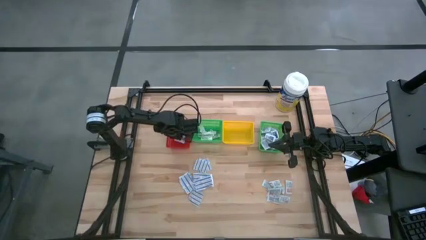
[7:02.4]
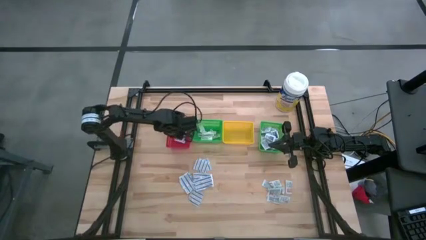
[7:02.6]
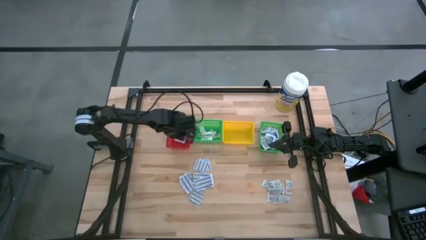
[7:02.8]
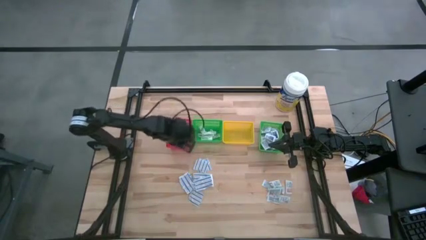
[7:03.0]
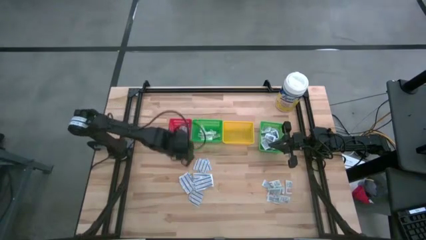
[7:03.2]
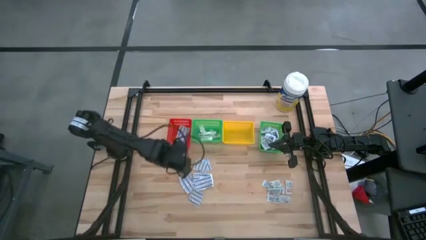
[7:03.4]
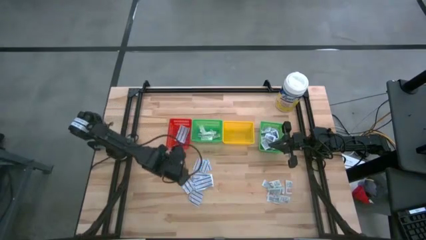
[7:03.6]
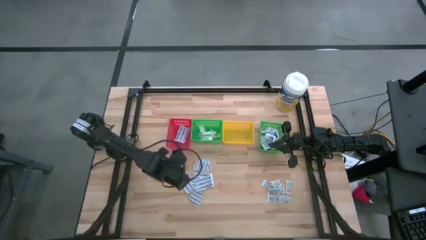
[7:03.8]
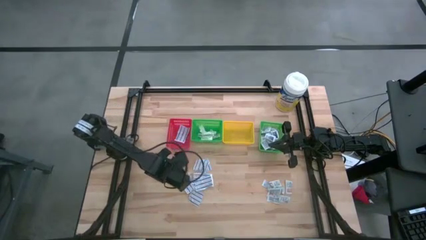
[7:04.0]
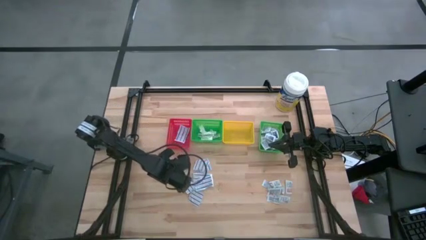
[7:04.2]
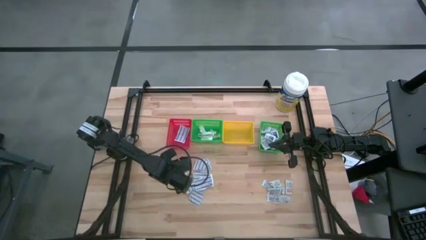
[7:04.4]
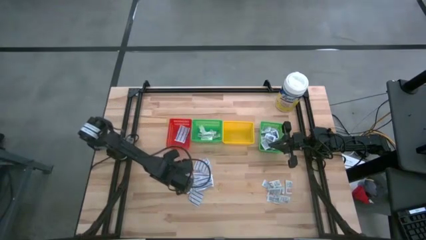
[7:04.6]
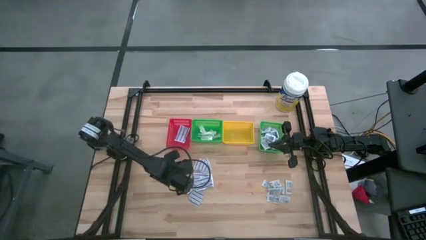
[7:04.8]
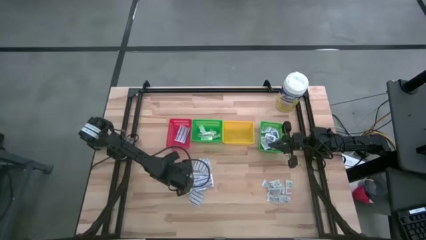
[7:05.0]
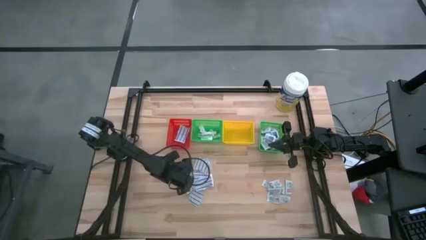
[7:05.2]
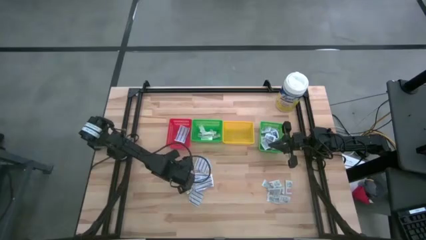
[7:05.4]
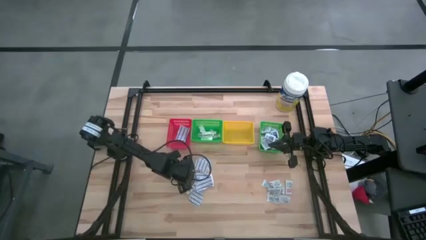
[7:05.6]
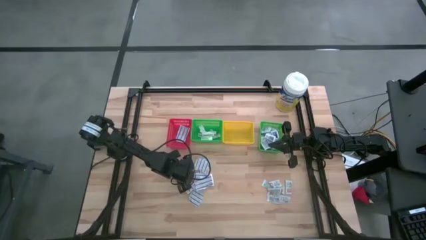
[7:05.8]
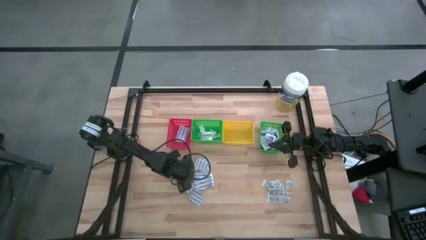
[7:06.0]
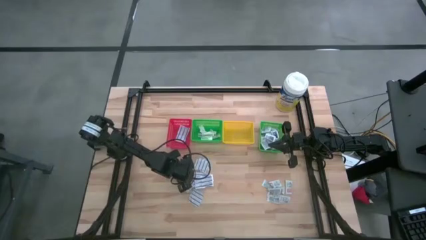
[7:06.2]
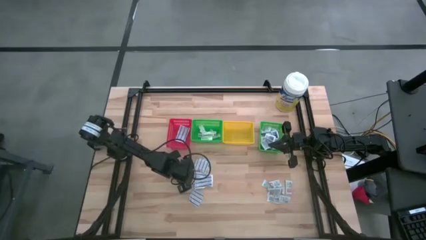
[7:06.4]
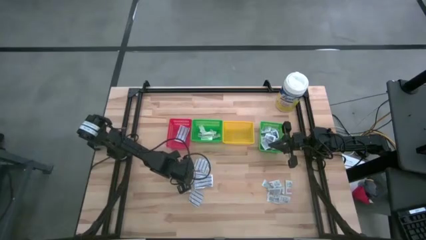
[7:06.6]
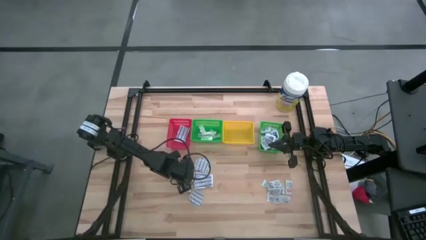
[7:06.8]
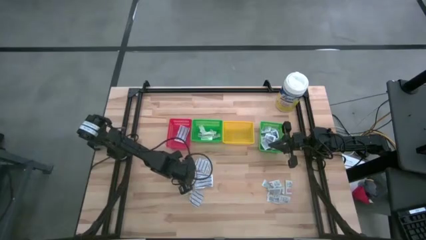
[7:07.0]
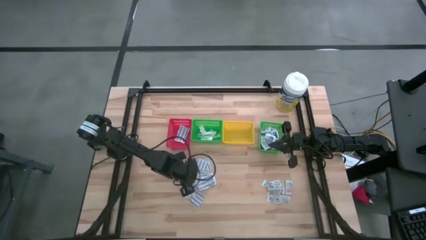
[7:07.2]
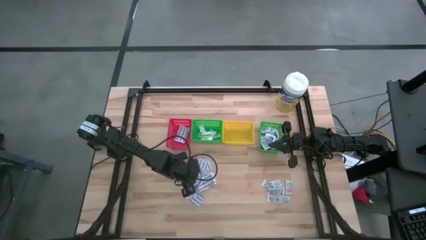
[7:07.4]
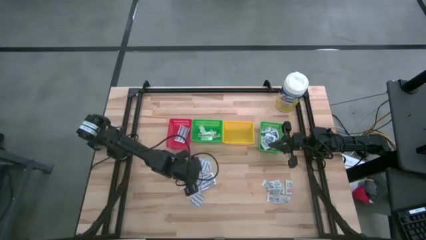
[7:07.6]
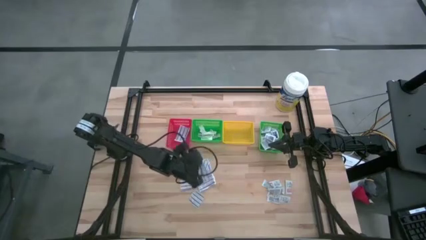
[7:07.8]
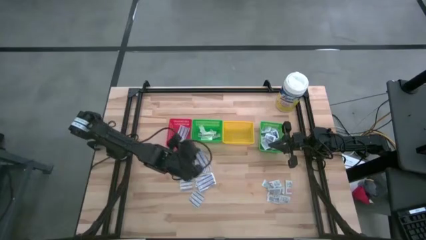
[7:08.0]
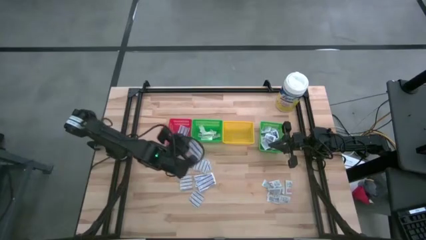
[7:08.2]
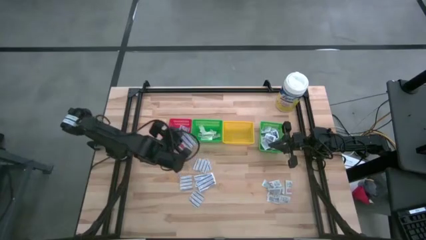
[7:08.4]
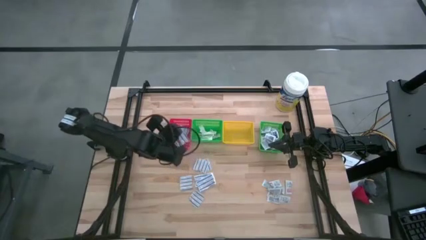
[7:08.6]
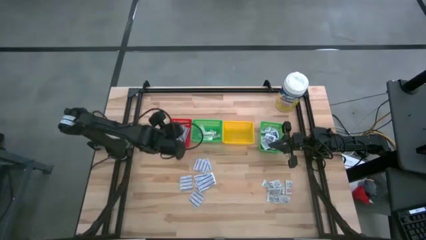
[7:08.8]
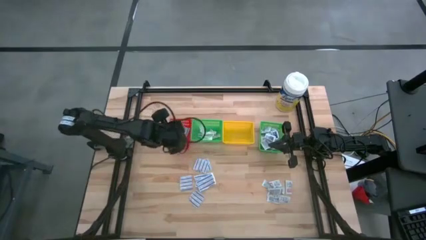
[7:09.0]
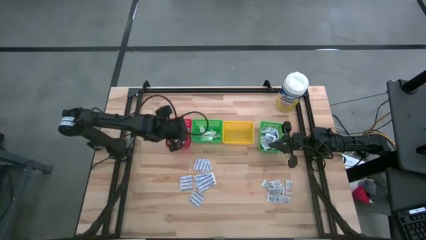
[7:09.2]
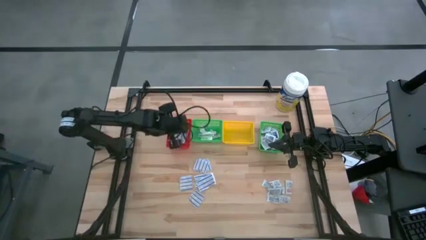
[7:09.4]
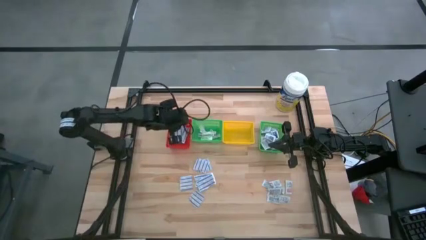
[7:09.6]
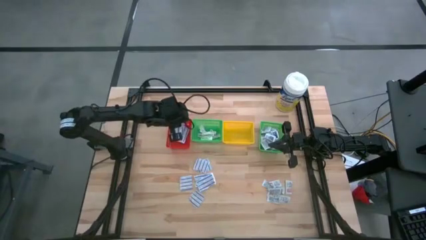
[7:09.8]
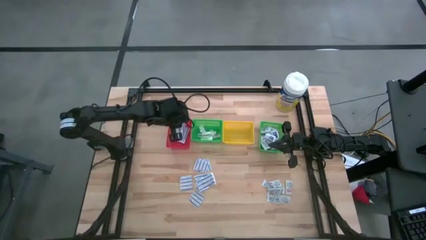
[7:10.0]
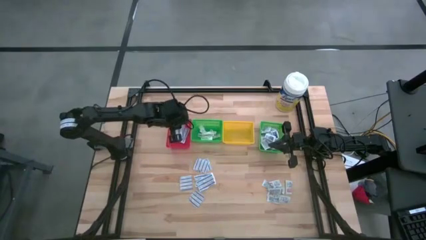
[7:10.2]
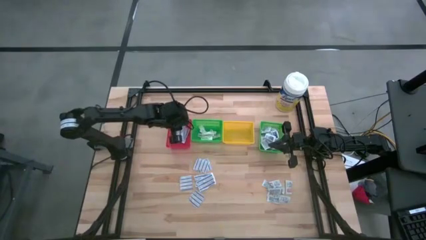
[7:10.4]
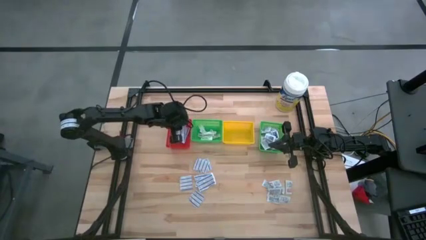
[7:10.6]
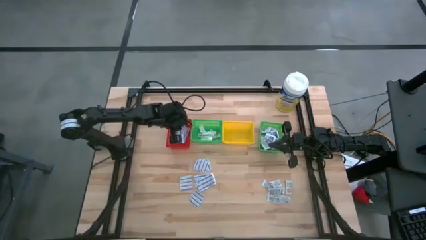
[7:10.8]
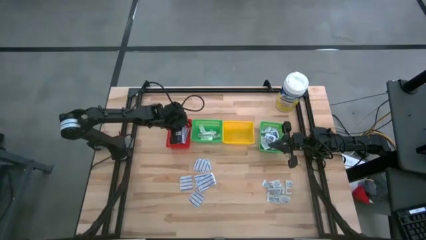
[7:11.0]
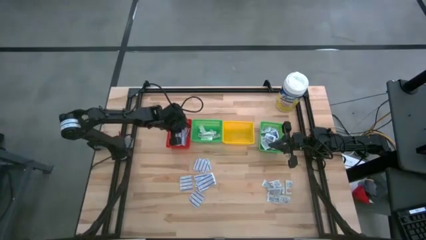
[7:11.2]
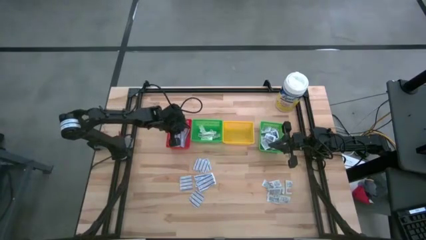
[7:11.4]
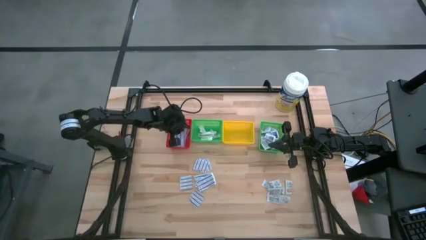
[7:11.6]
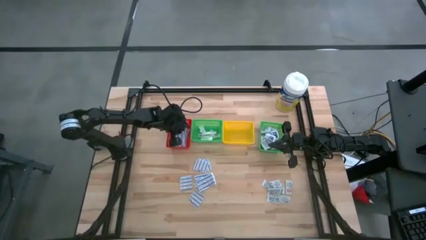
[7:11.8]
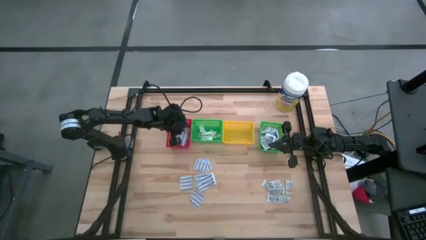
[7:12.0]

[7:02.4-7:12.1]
Task: Pick & Place First Aid Supplies
Put the blue bandage into the red bin

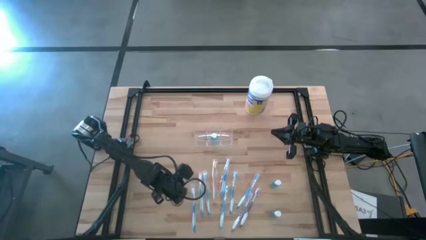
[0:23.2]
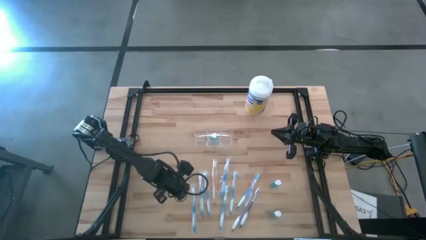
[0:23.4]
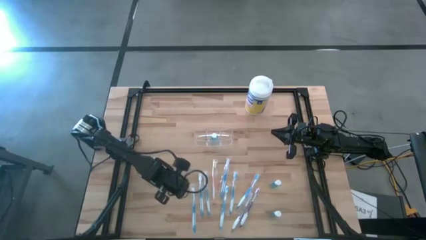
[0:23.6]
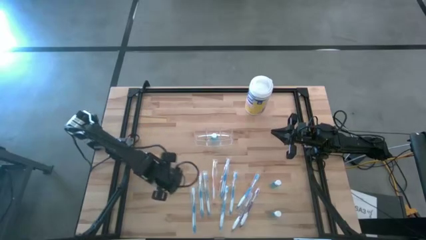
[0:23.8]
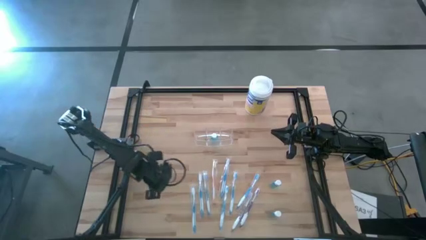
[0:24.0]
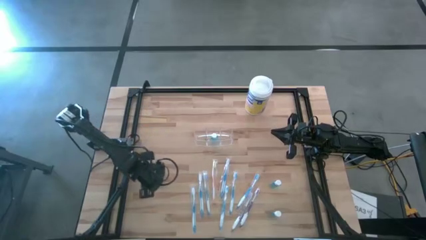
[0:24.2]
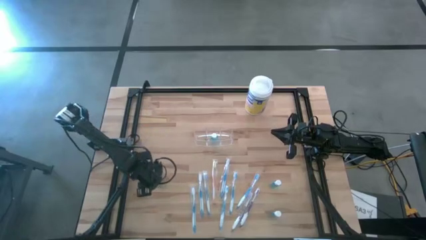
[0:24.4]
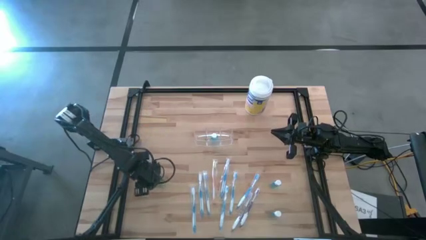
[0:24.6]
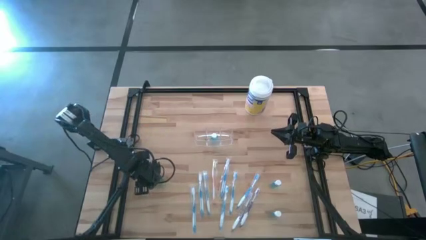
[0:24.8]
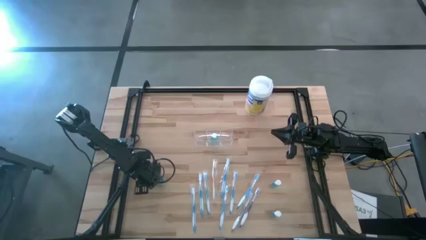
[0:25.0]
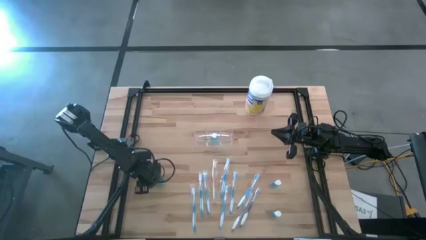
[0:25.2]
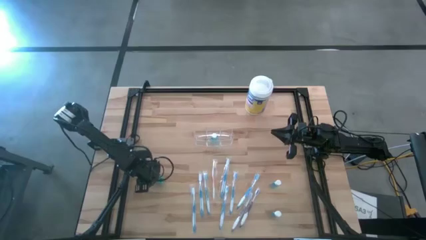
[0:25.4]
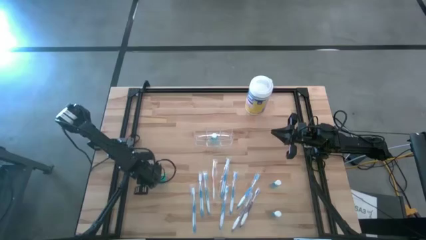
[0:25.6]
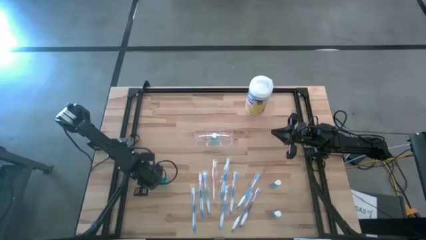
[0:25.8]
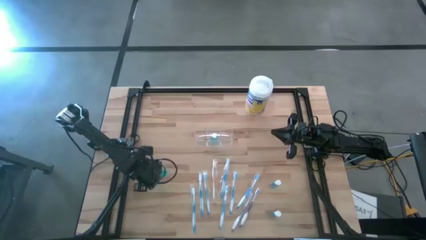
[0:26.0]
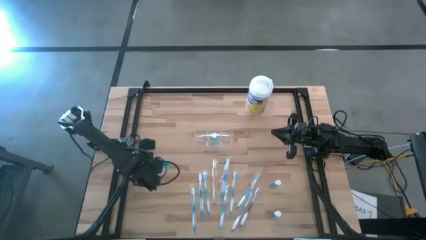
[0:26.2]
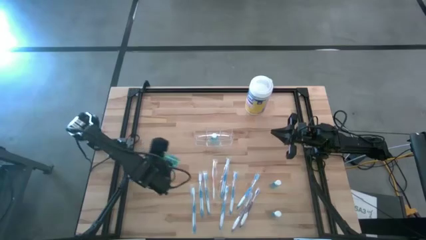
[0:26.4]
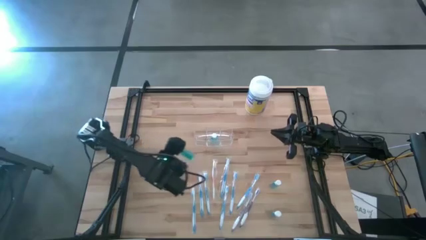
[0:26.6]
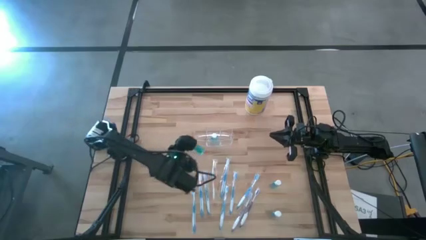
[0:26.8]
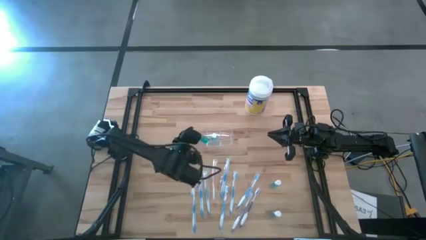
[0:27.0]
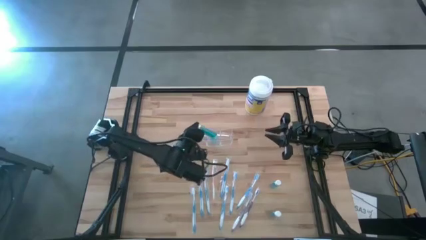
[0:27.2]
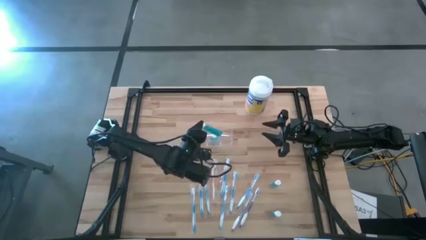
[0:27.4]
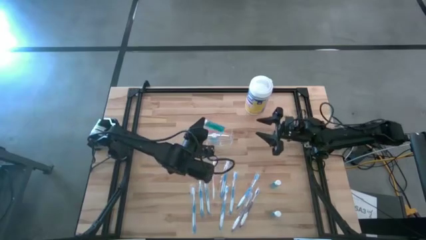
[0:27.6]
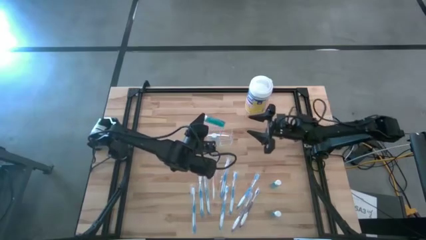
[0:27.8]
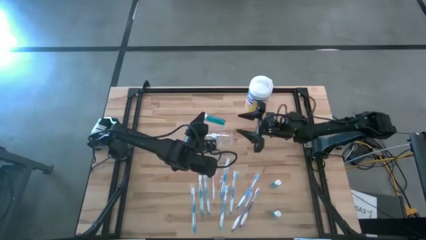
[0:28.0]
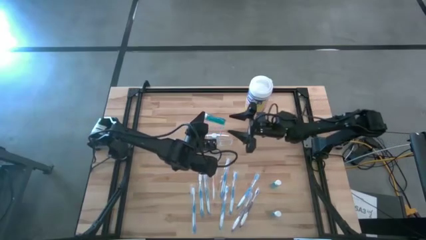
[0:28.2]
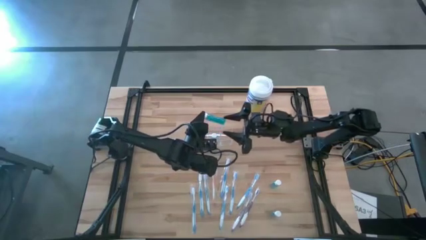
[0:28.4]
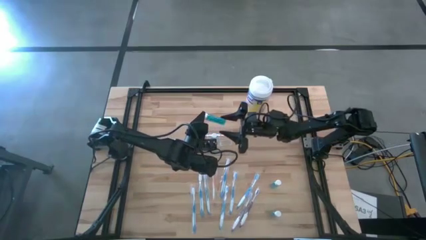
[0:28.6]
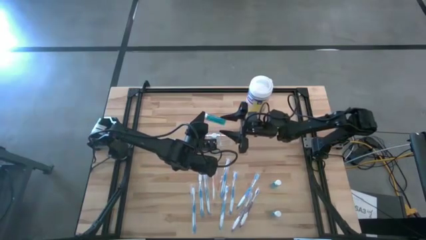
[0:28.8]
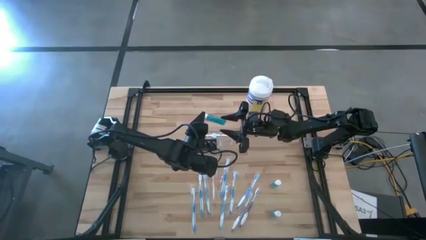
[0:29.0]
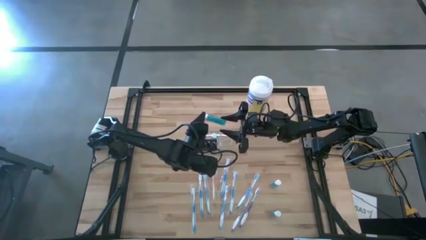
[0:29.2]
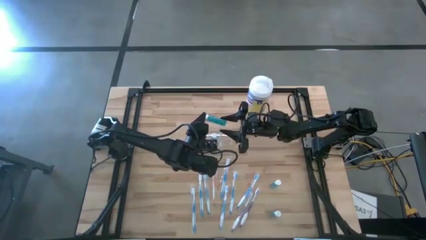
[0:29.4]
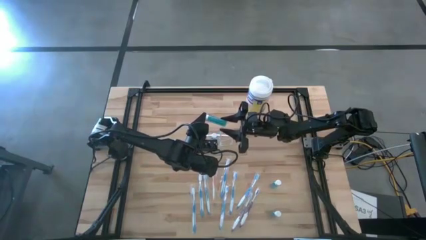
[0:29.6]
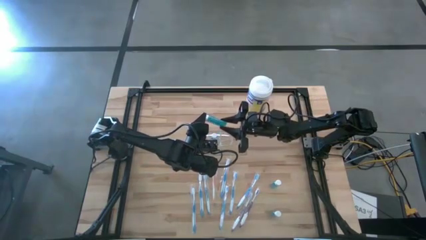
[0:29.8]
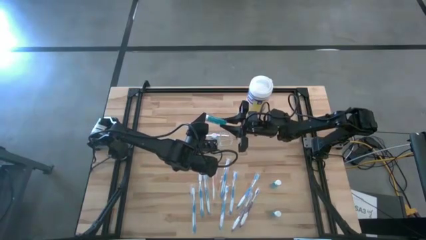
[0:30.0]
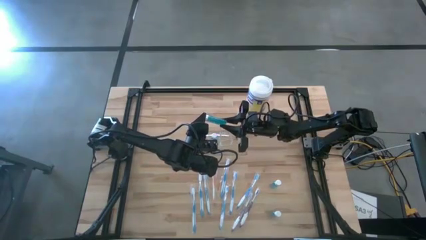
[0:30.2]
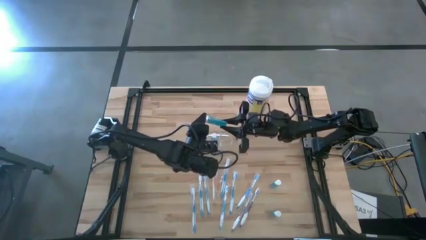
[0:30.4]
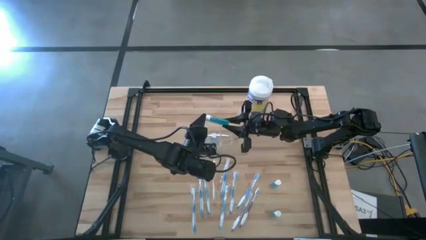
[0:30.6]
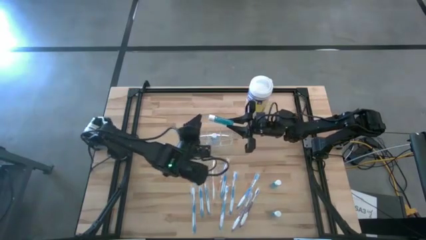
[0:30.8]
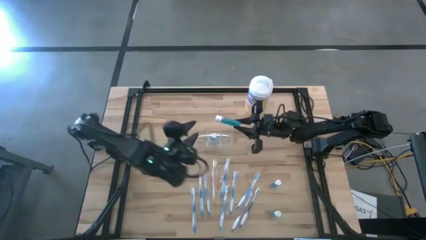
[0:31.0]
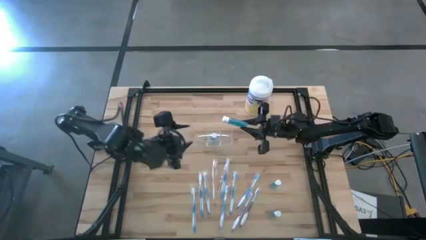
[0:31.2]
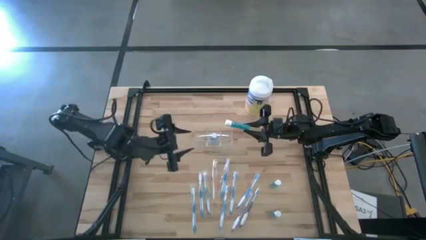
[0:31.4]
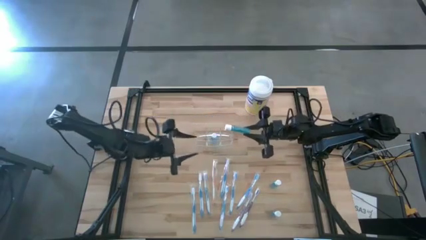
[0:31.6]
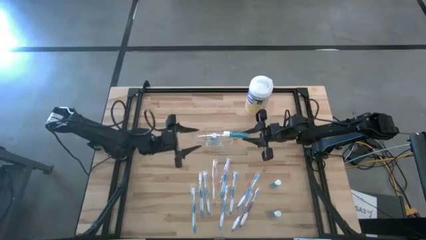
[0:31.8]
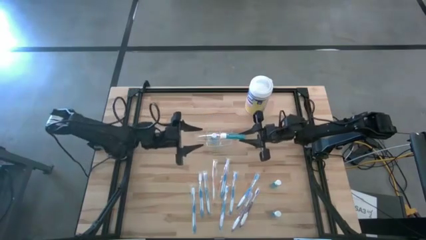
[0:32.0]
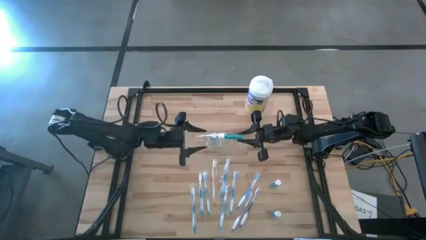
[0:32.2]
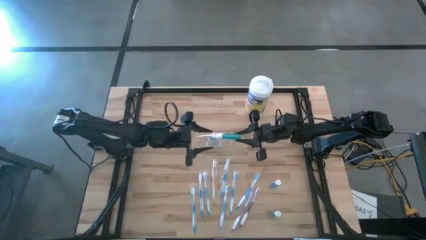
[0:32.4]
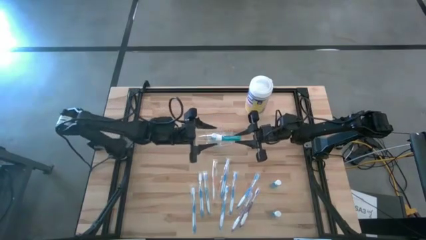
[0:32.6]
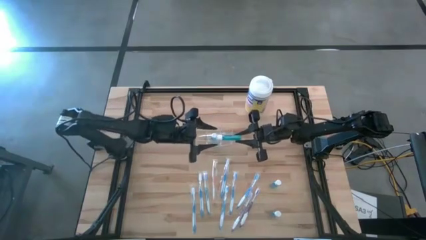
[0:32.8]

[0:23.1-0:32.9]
Task: Pick & Place toothbrushing station
Put the blue mouthwash into the transparent organizer
